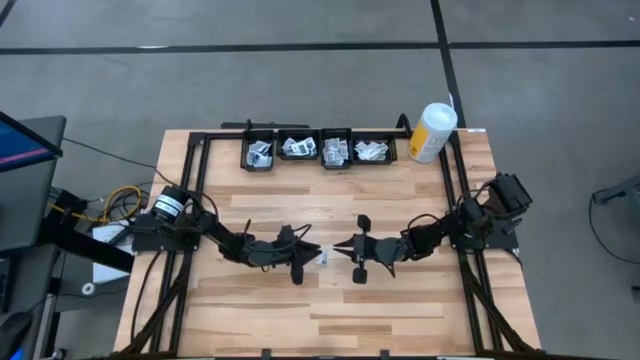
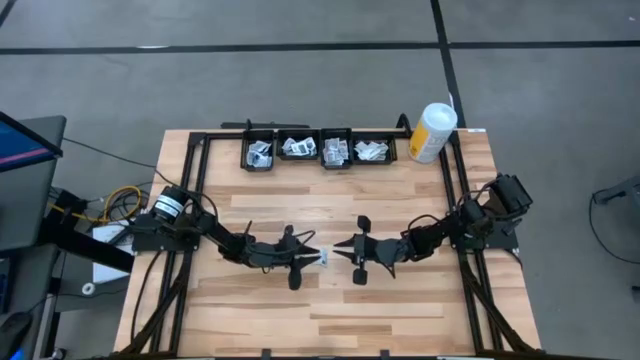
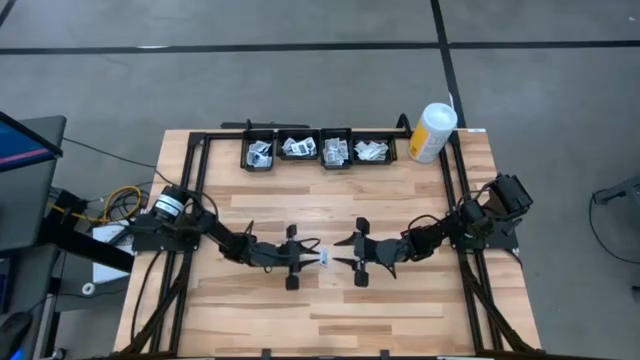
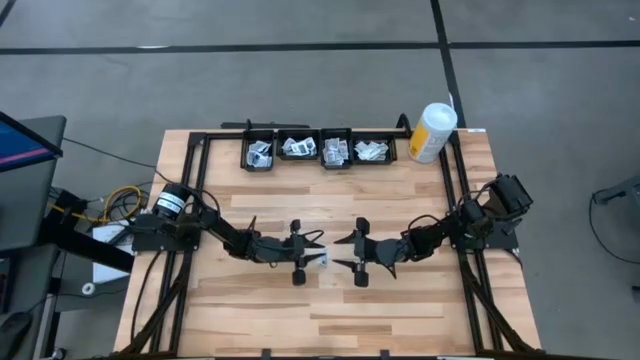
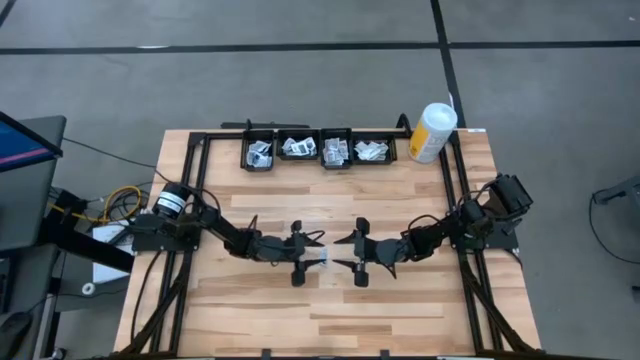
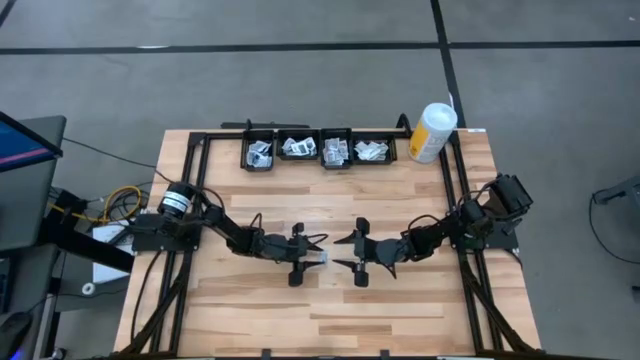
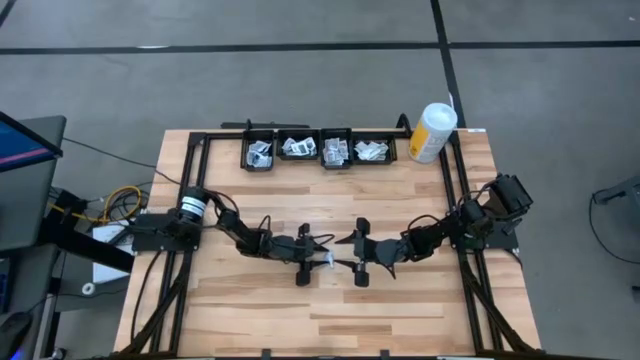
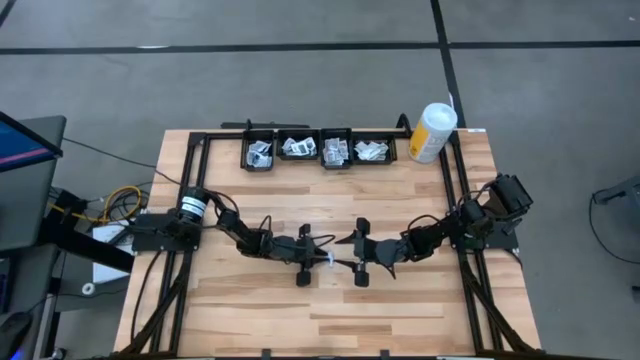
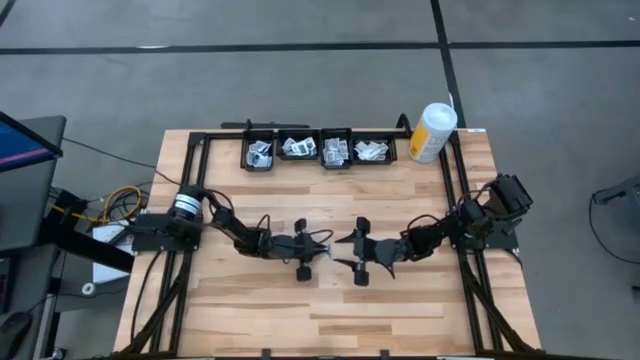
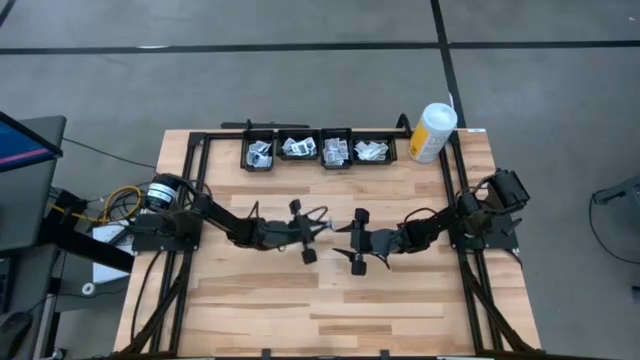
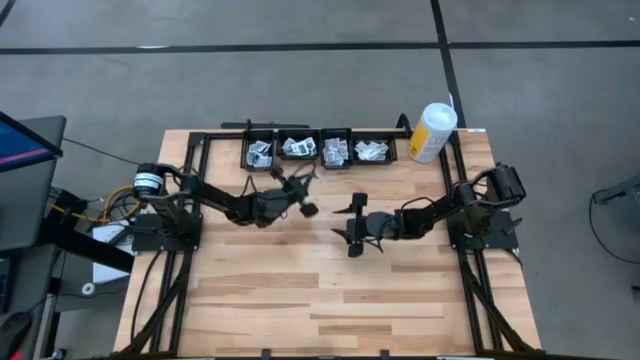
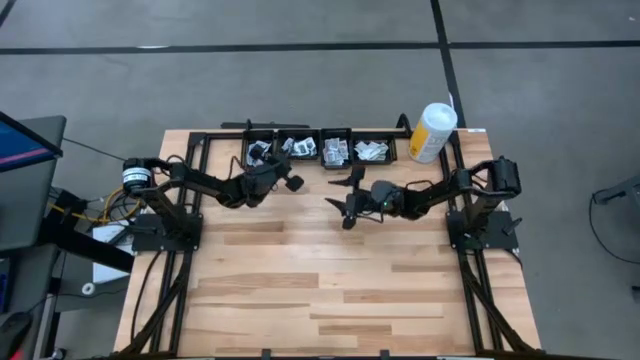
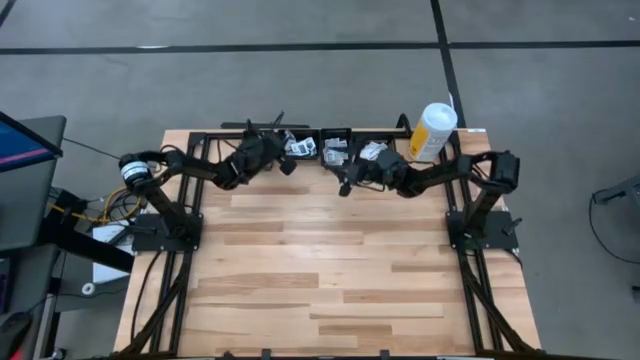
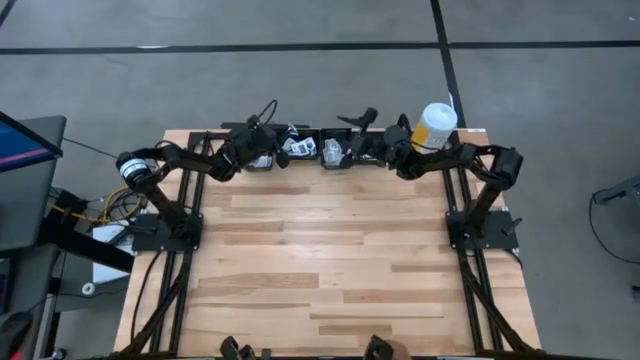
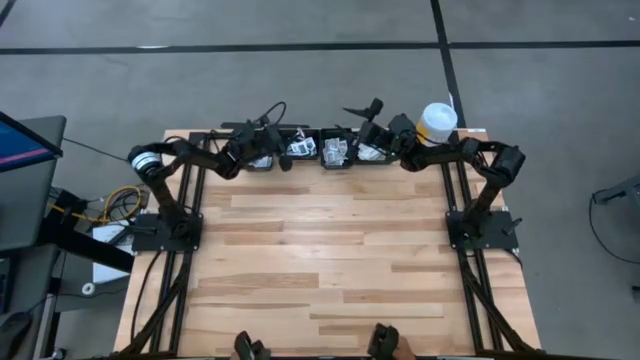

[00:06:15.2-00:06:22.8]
Task: Pick & Place First Aid Supplies
Put the black towelette pack into the middle left black bin

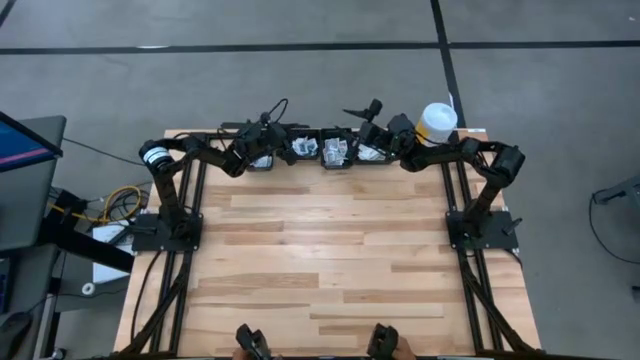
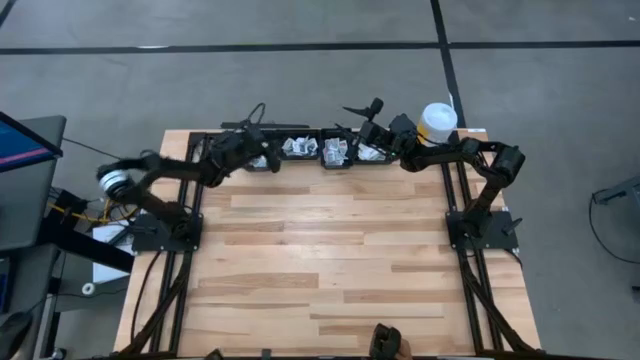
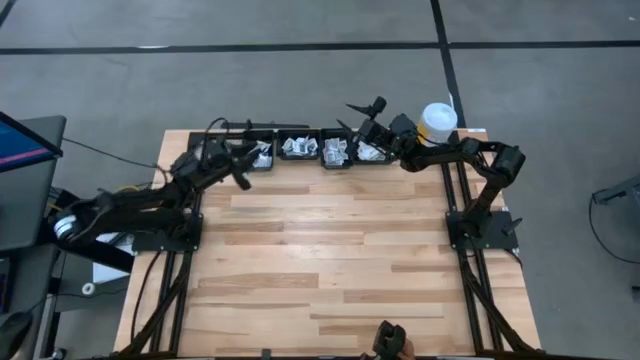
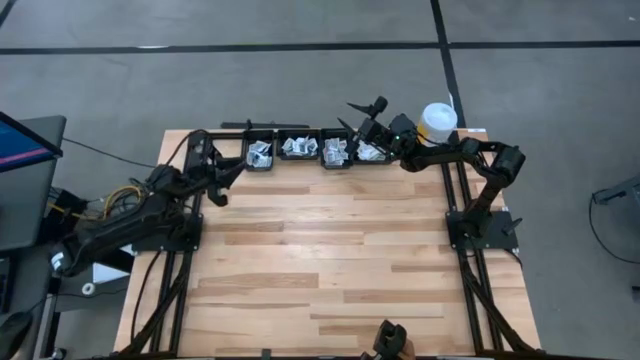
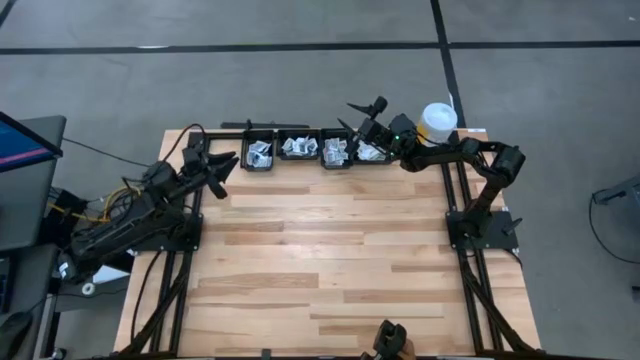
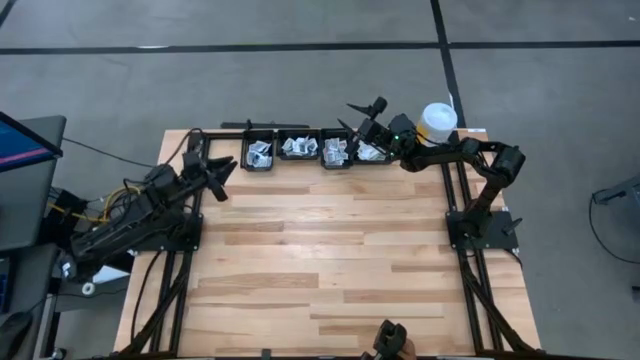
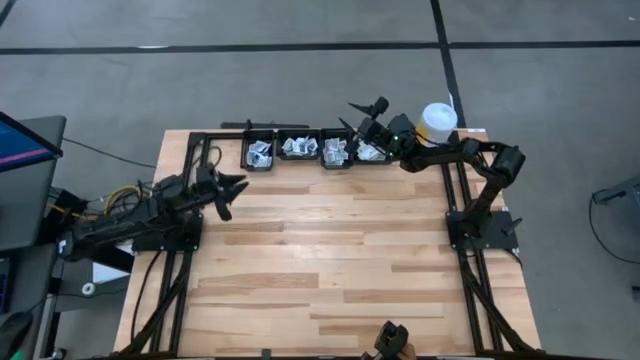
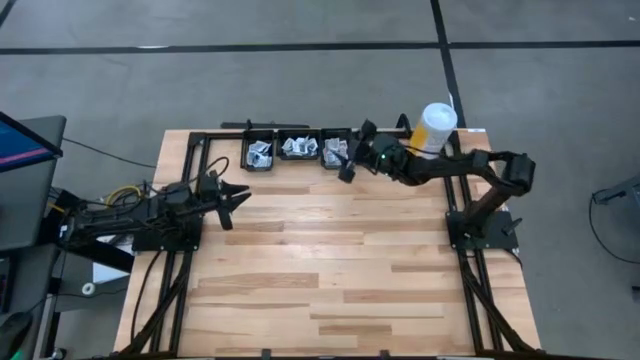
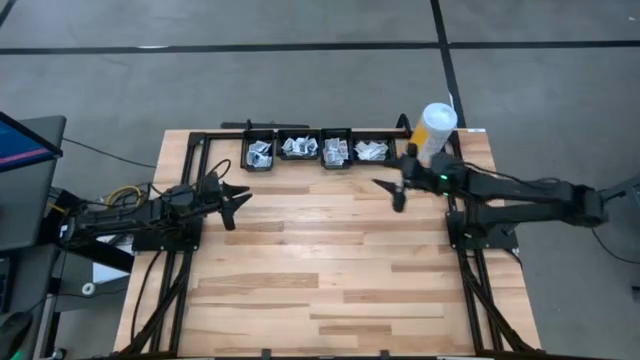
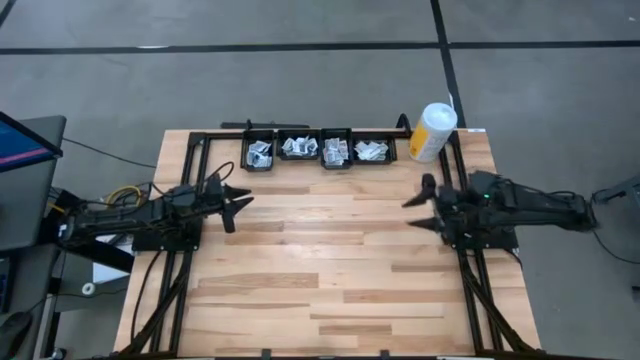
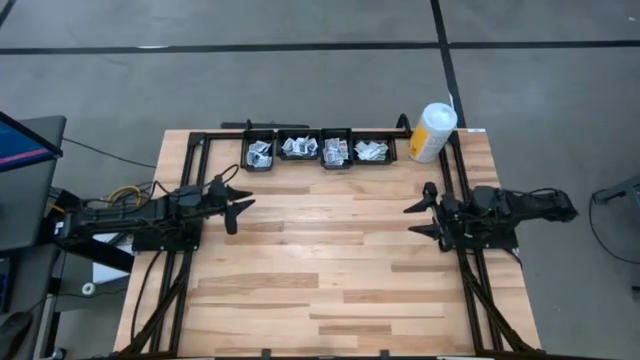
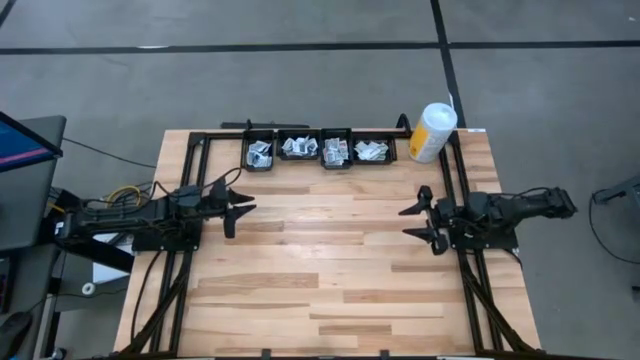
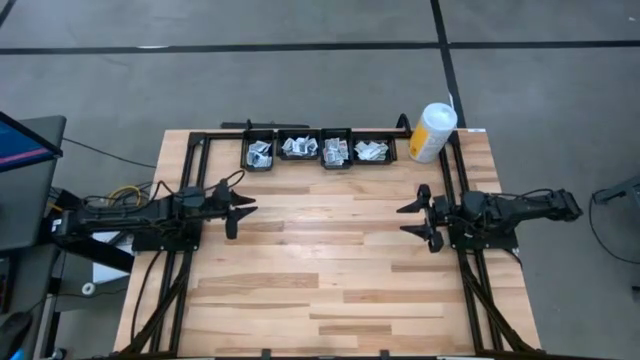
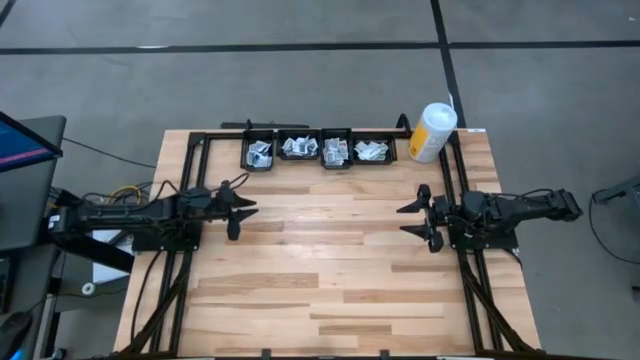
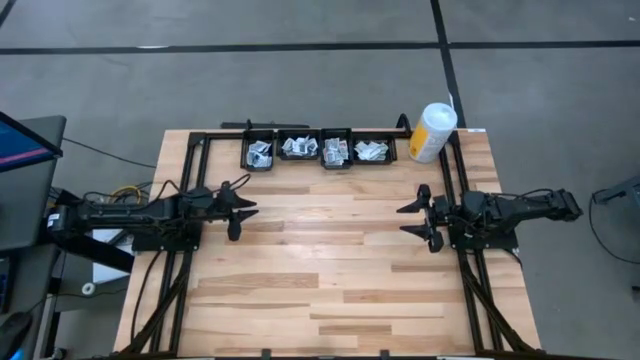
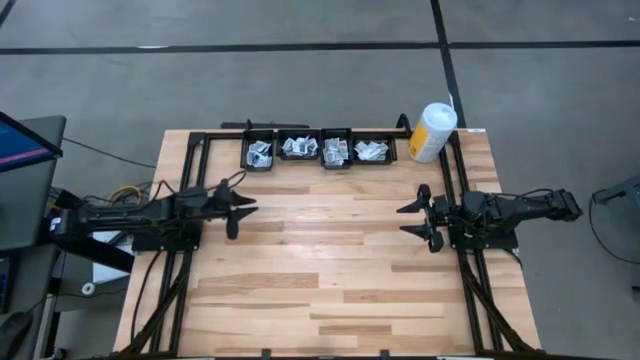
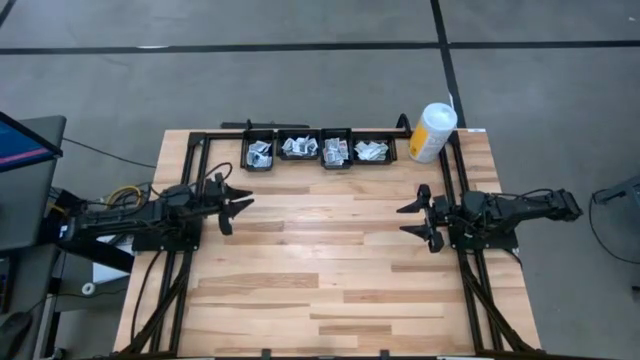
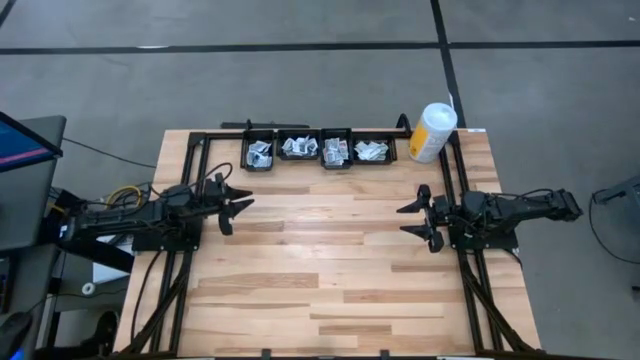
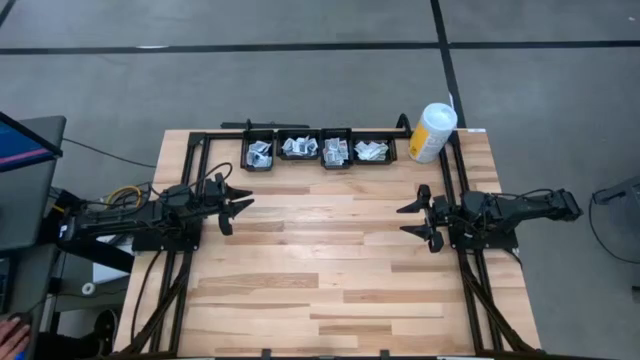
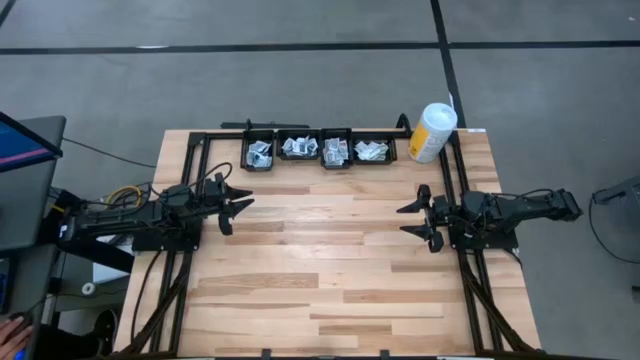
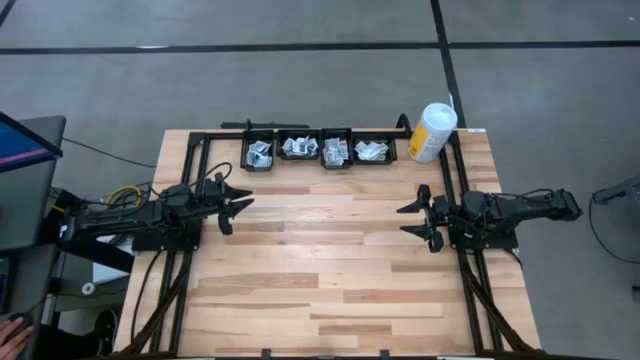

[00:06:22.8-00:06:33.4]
Return to Home Position

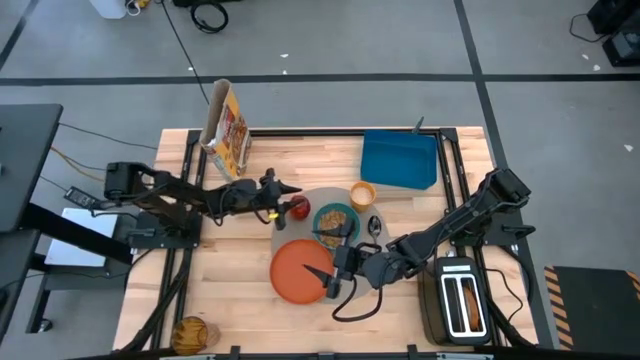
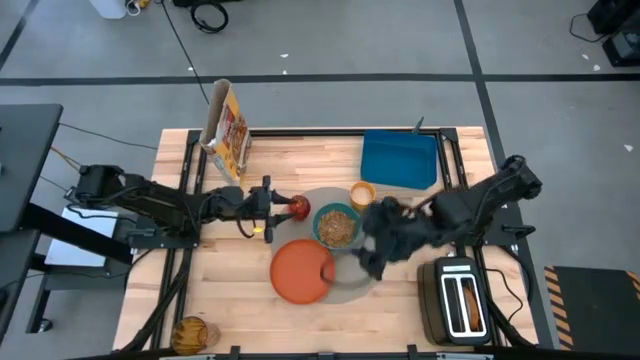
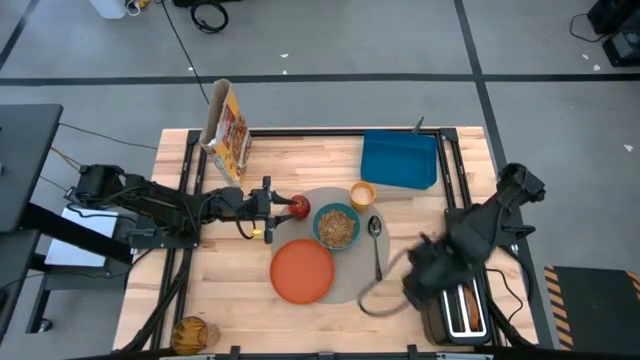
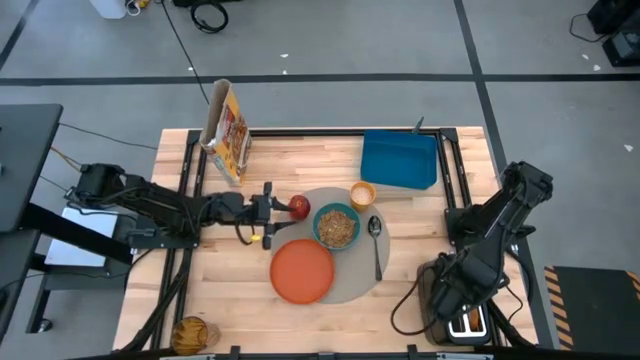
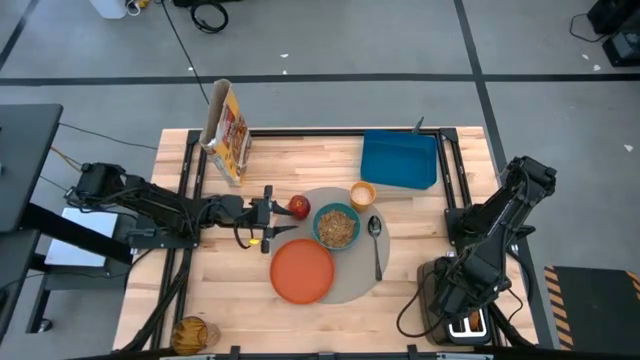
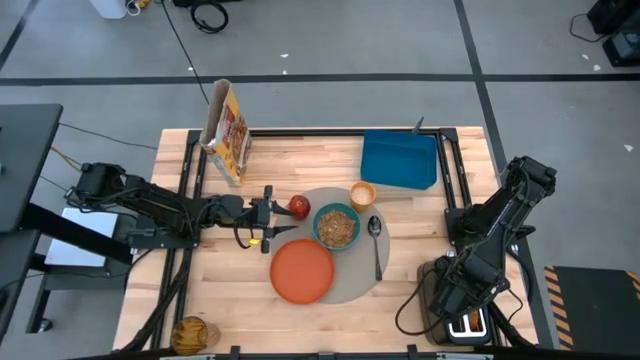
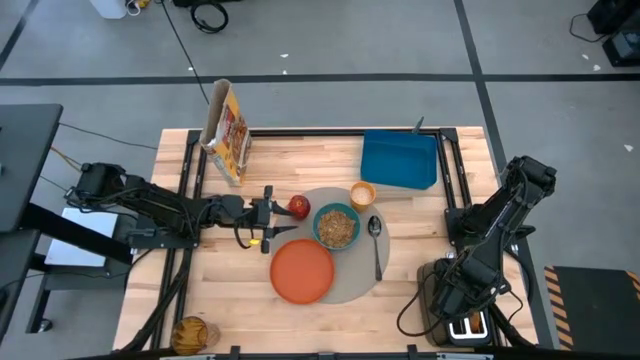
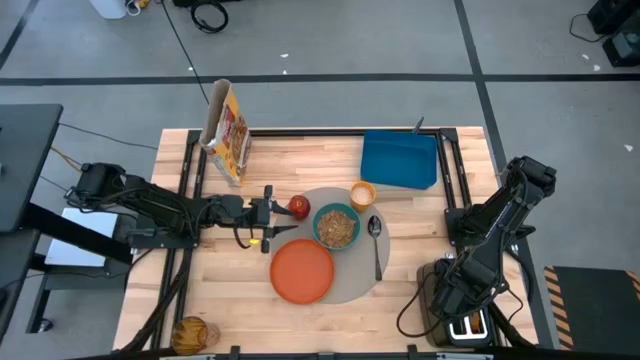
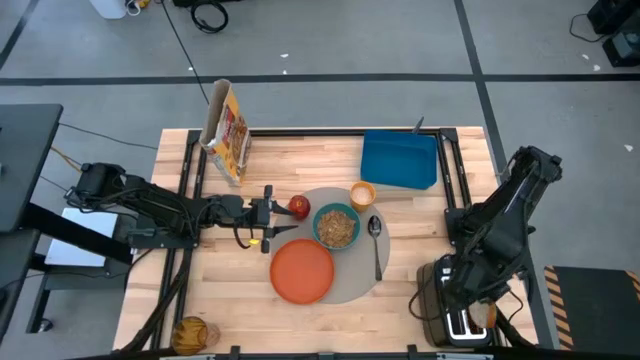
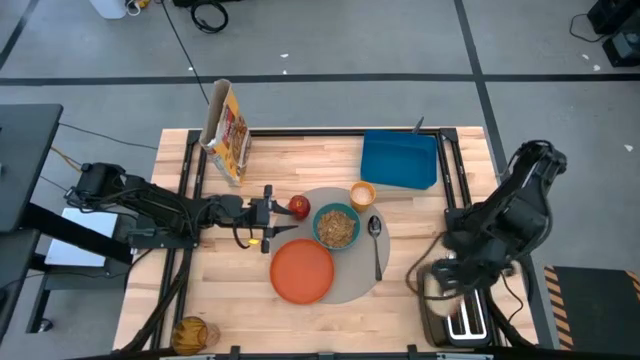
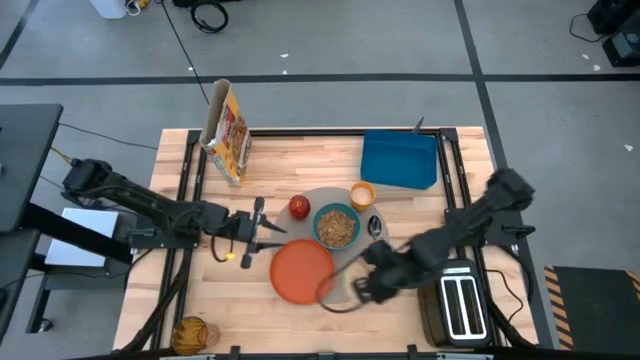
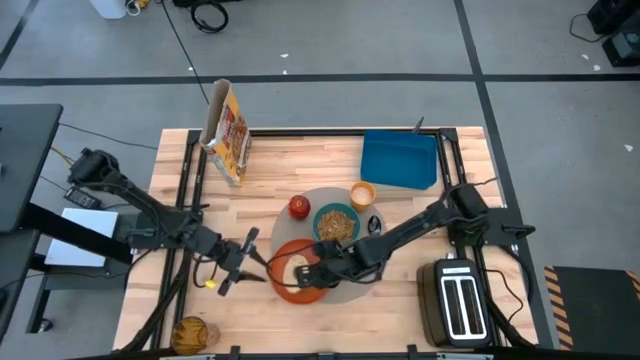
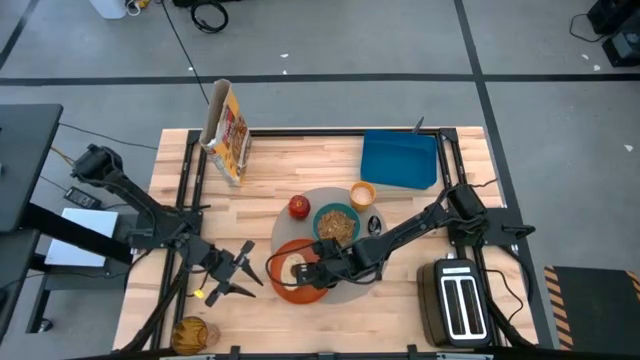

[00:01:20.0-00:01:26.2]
Task: Arrange a breakfast setting
Put the bread on the plate
